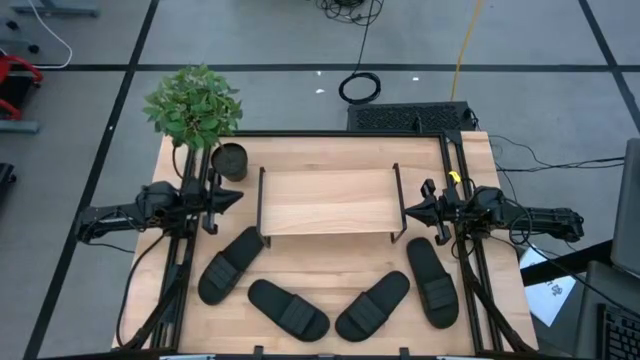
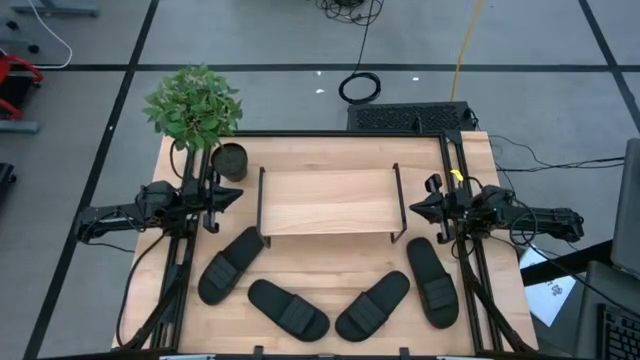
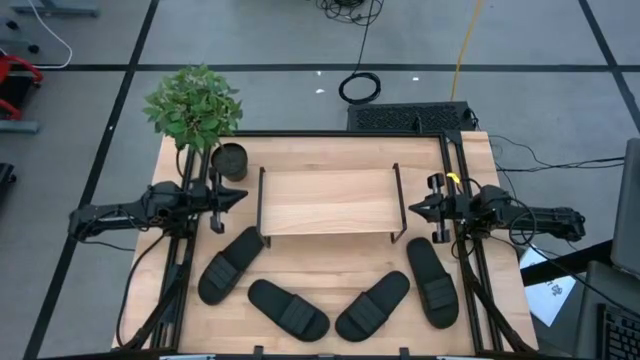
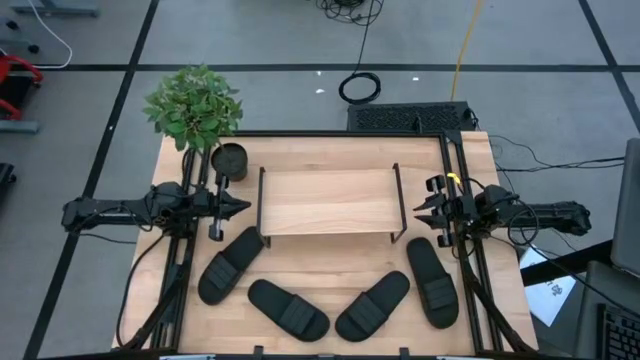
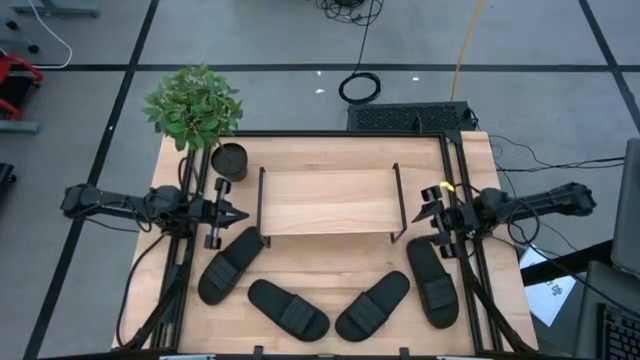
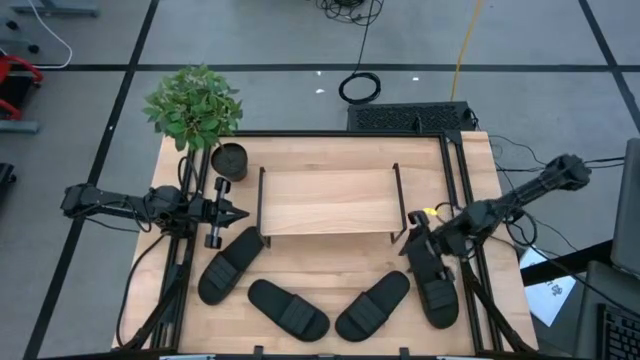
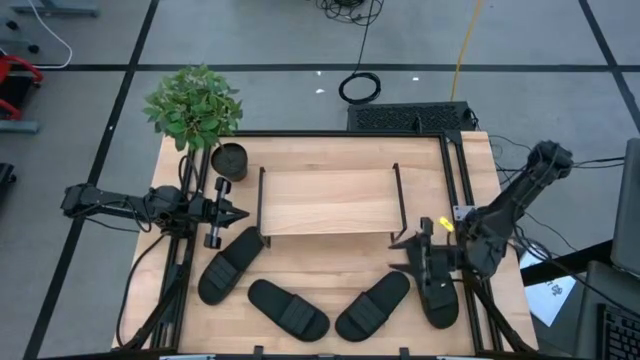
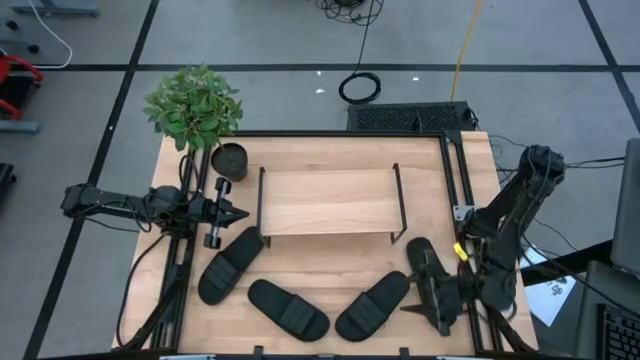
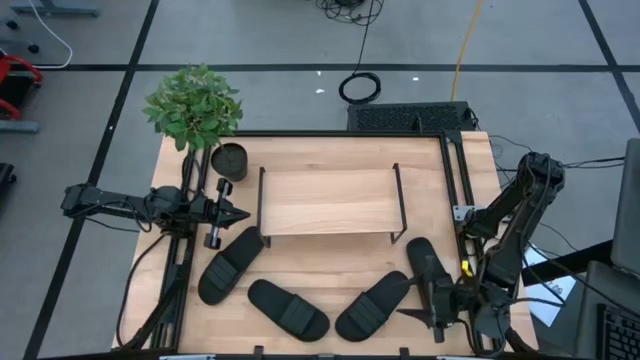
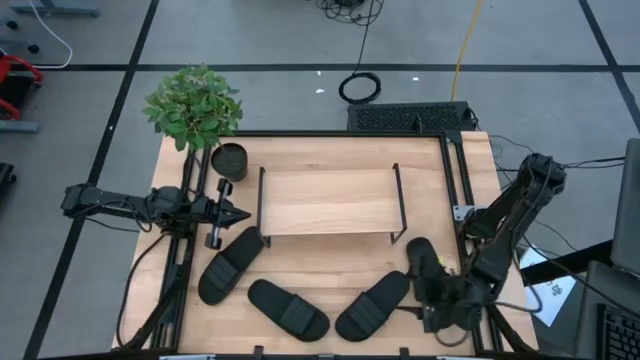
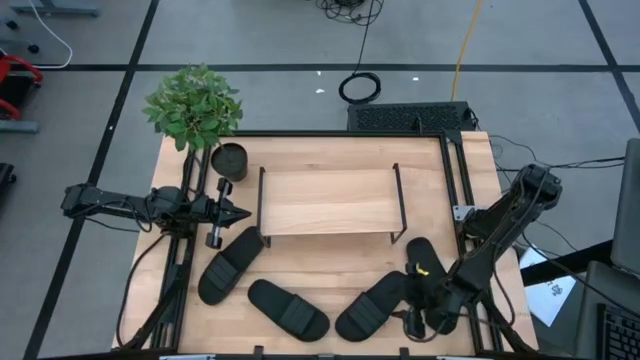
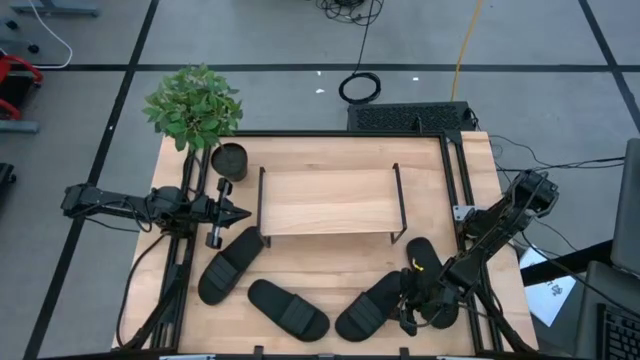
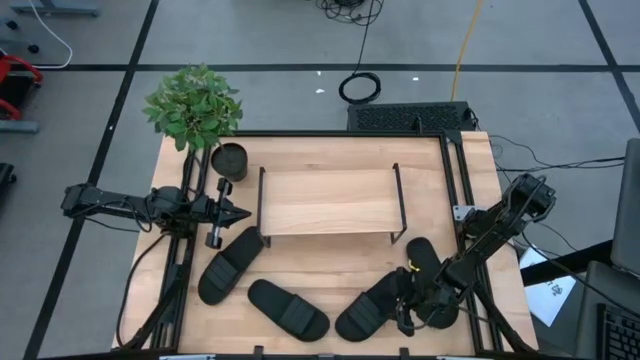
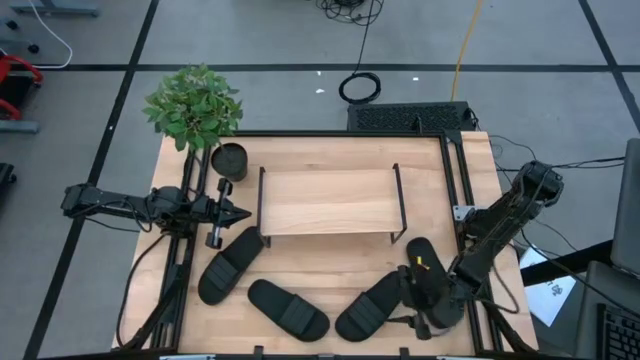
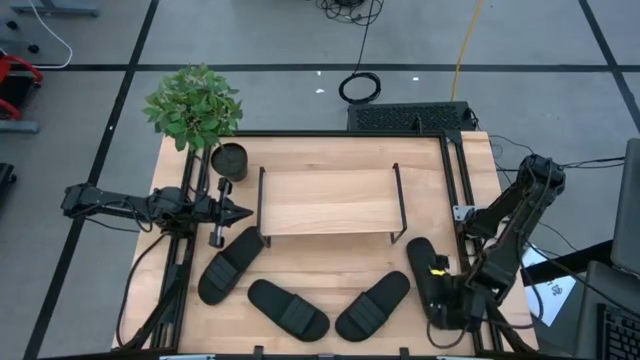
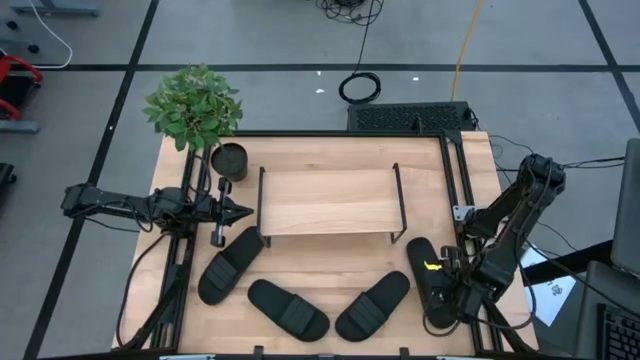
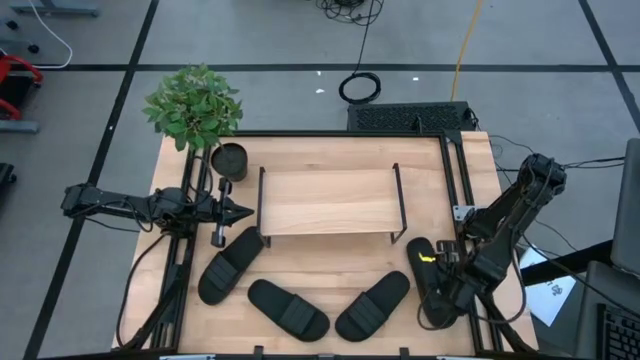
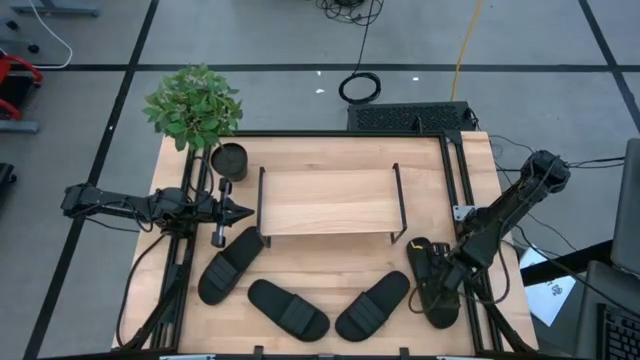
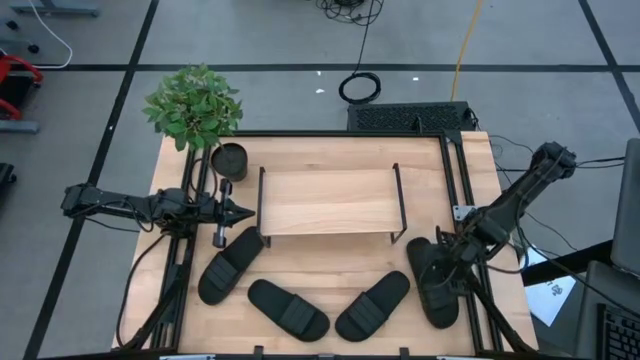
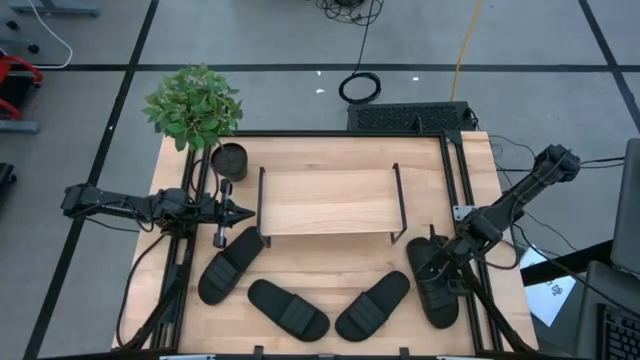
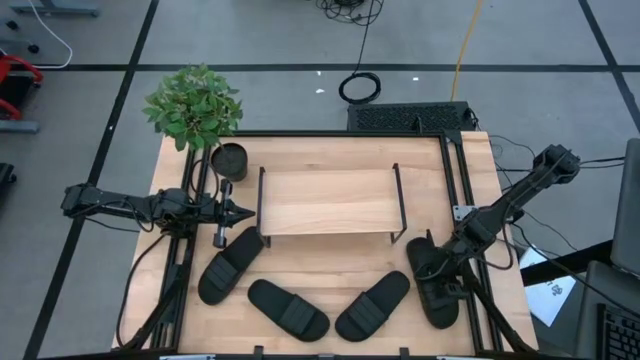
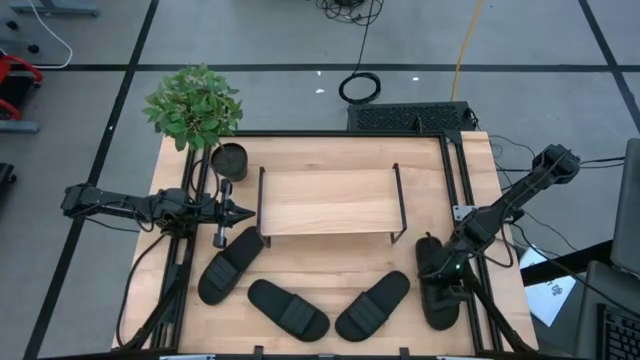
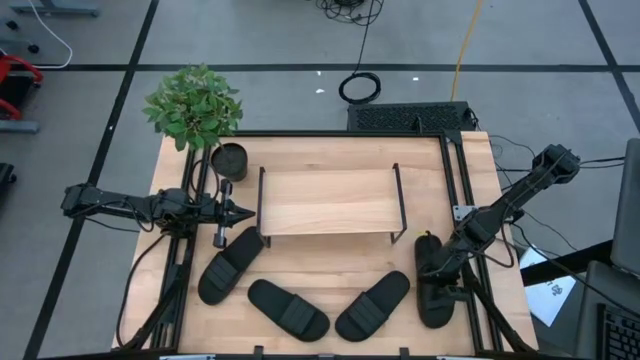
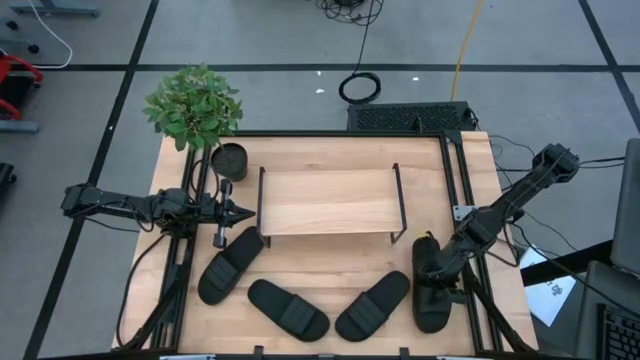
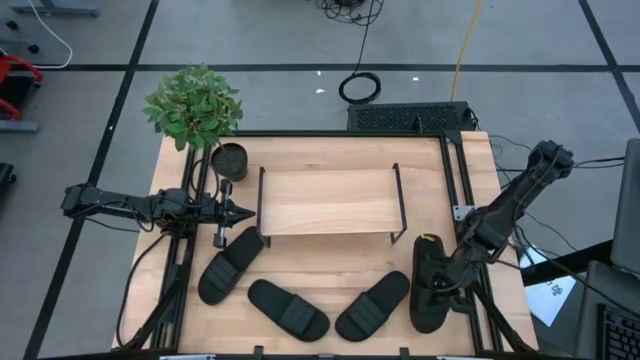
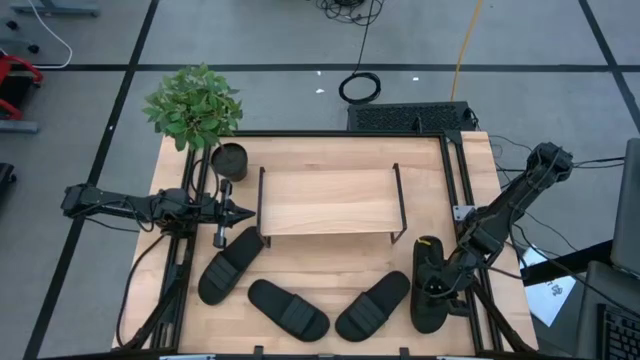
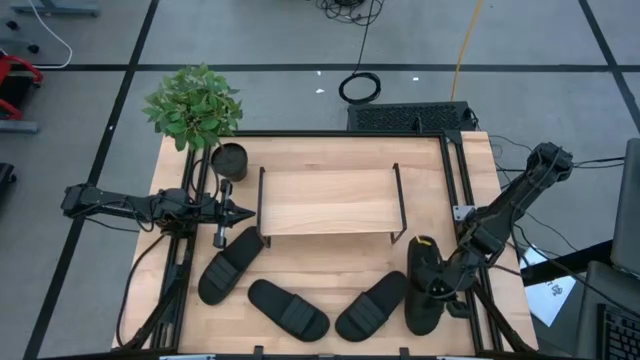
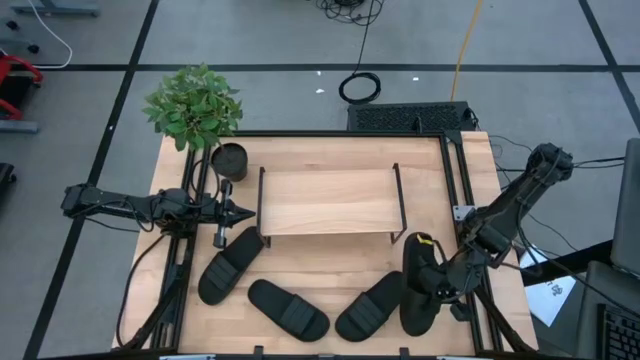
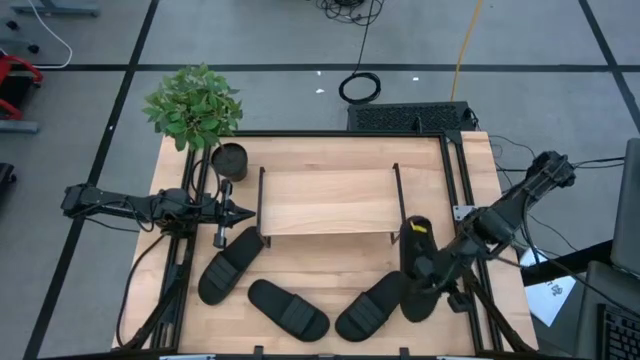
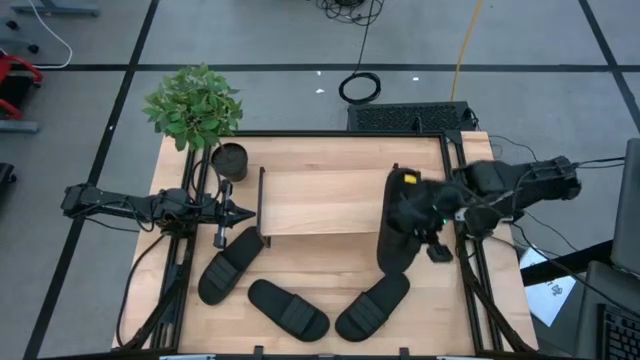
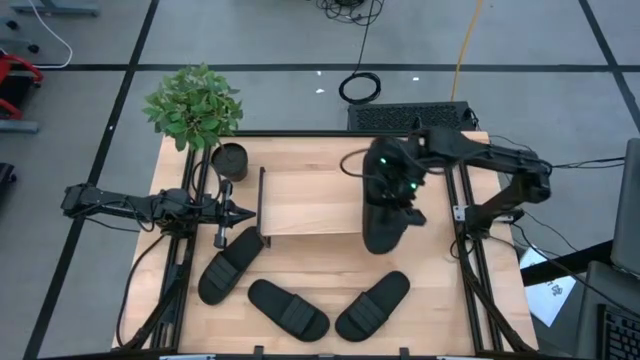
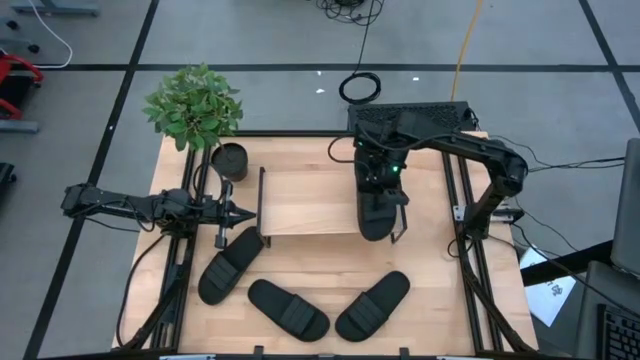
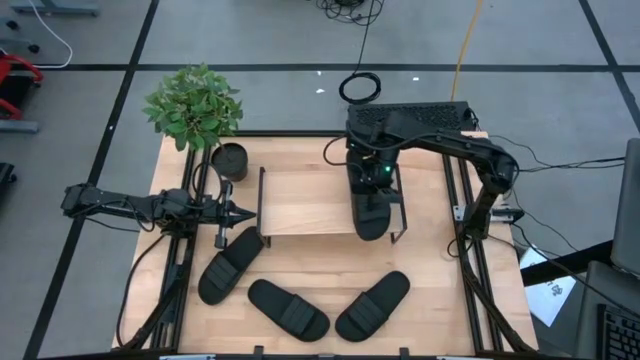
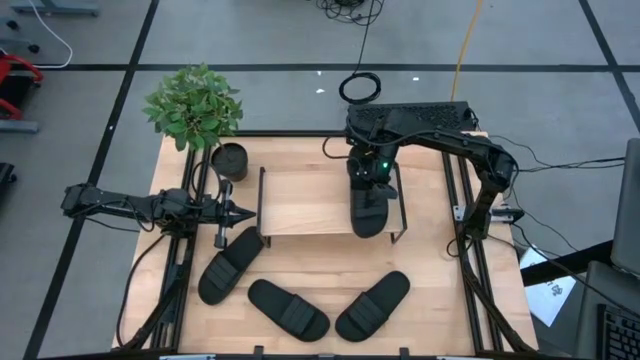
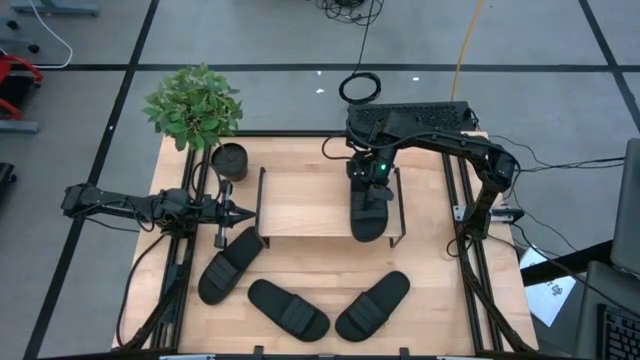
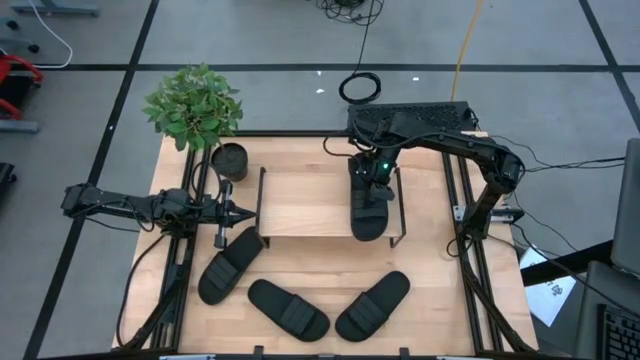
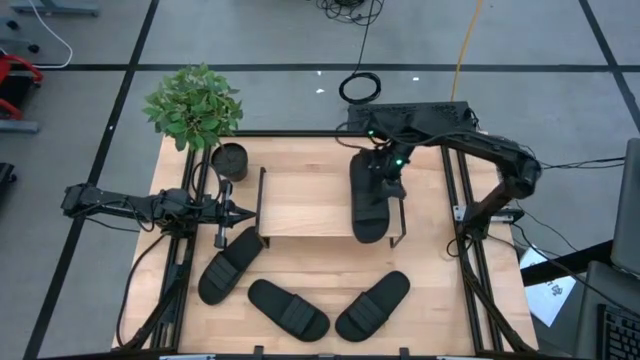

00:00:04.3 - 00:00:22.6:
Task: Pick and place slides into the shelf
Put the black slide on the shelf

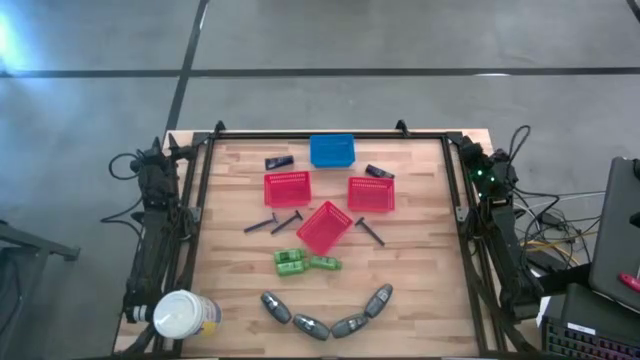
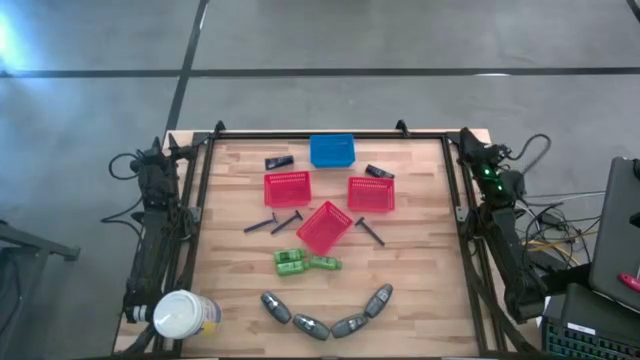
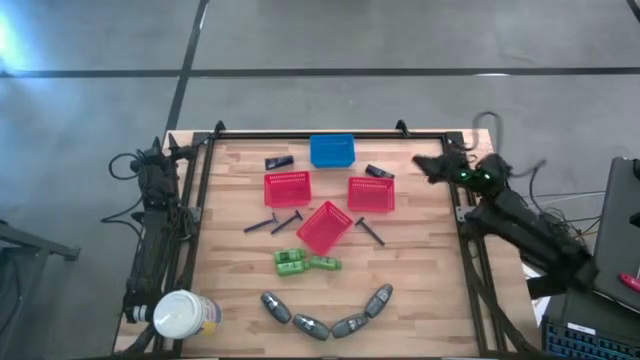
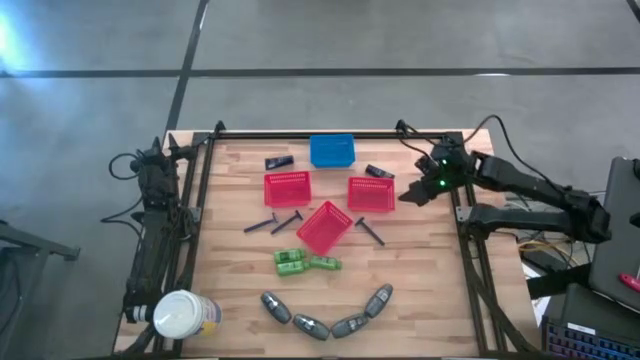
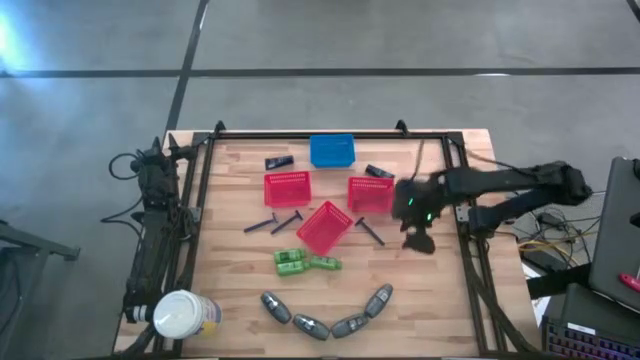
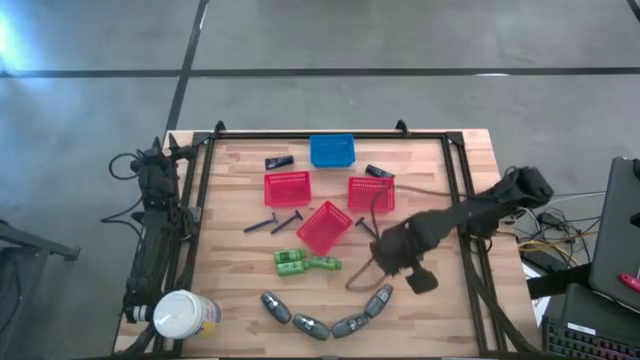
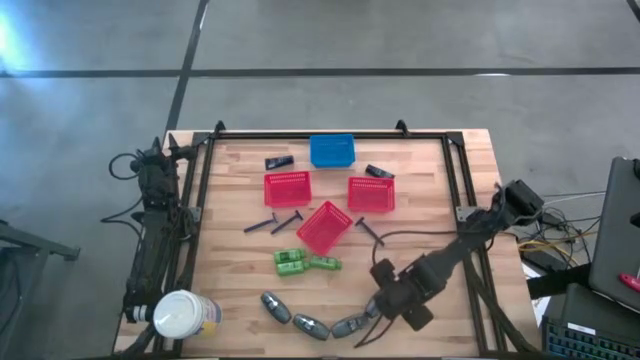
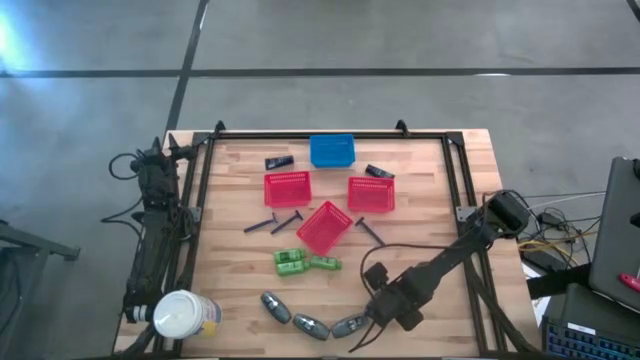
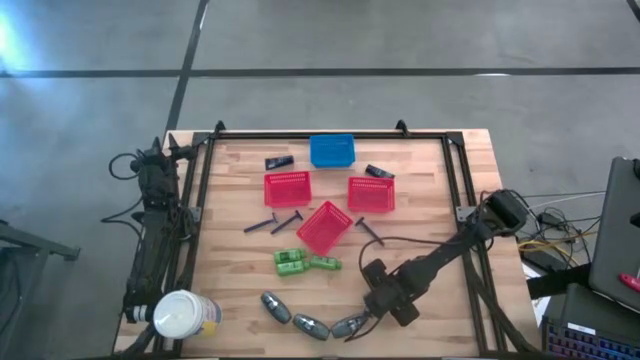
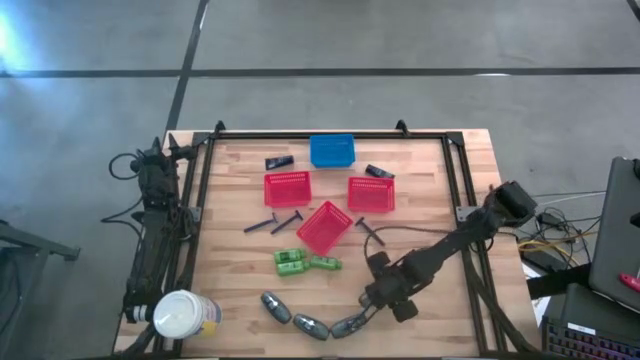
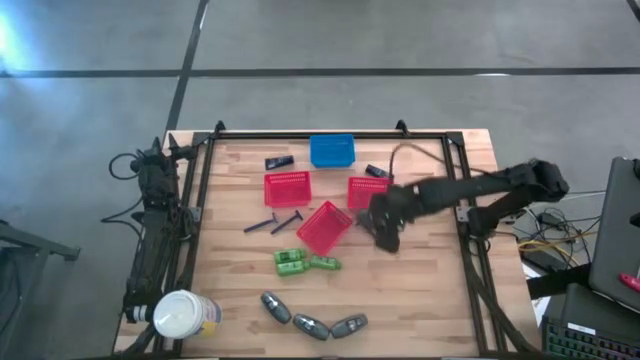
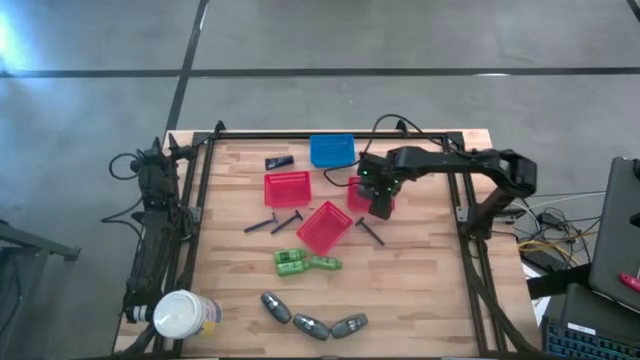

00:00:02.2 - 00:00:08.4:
Task: Pick & Place Travel size toiletries
Put the black deodorant into the top right red bin
